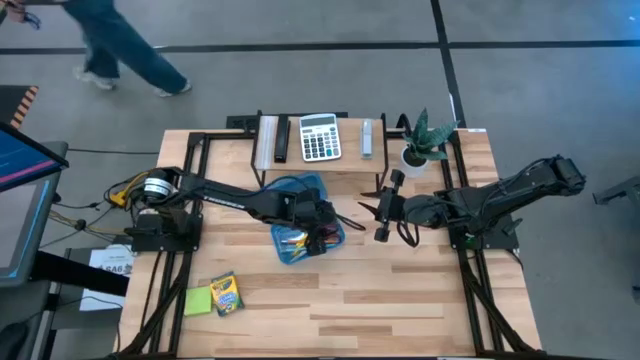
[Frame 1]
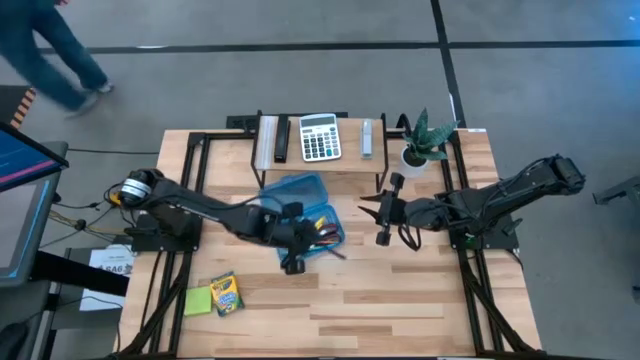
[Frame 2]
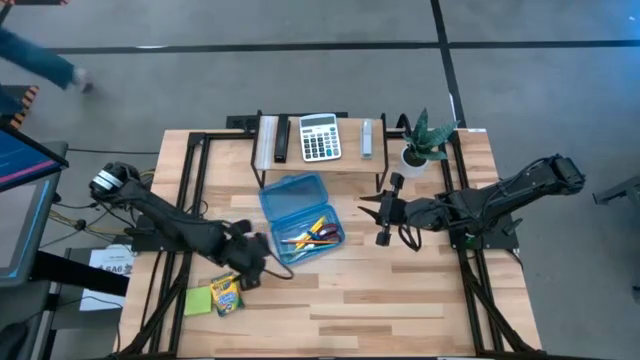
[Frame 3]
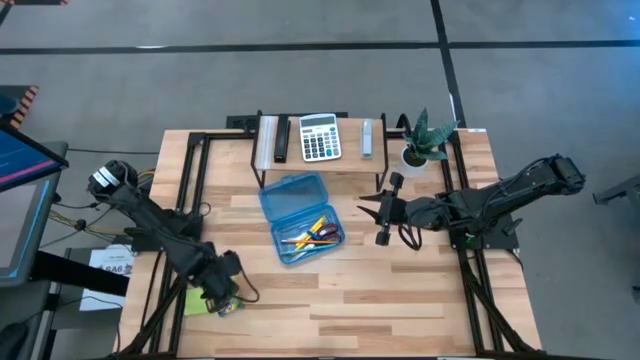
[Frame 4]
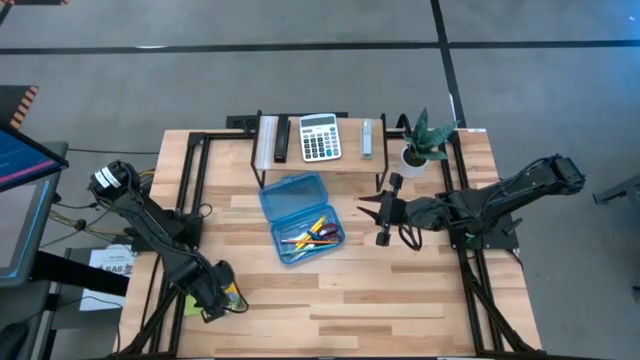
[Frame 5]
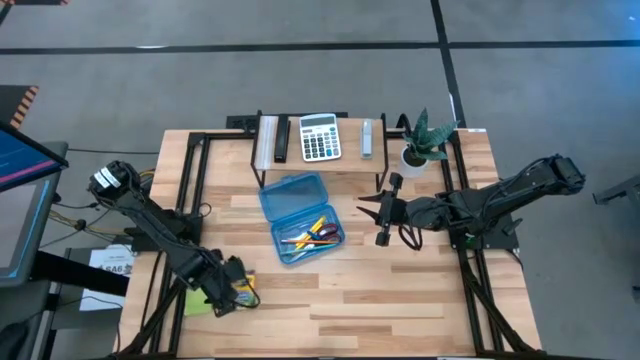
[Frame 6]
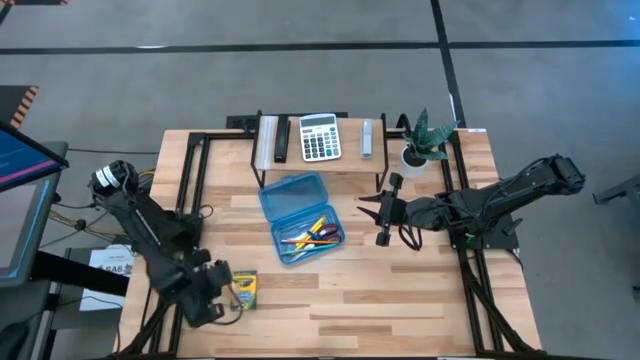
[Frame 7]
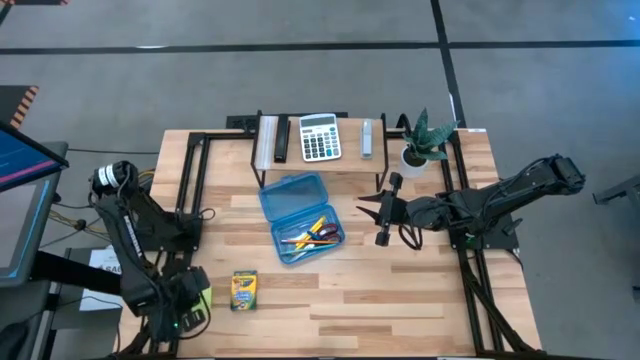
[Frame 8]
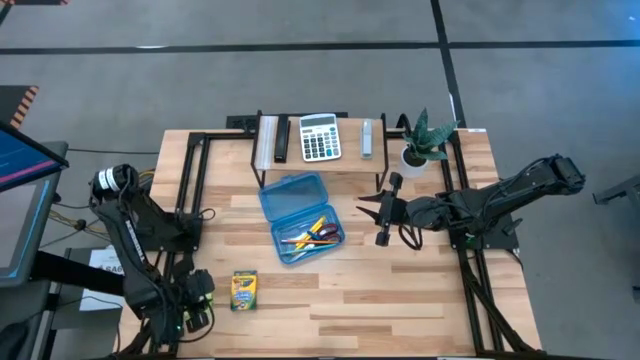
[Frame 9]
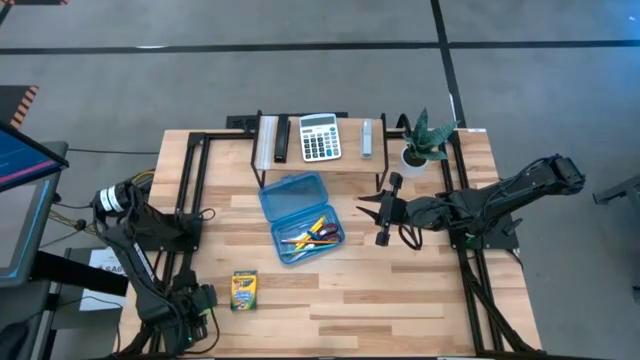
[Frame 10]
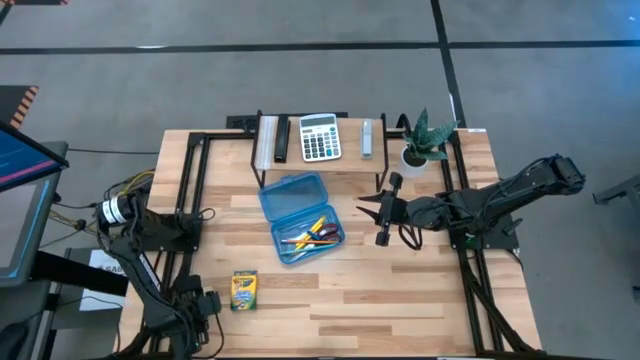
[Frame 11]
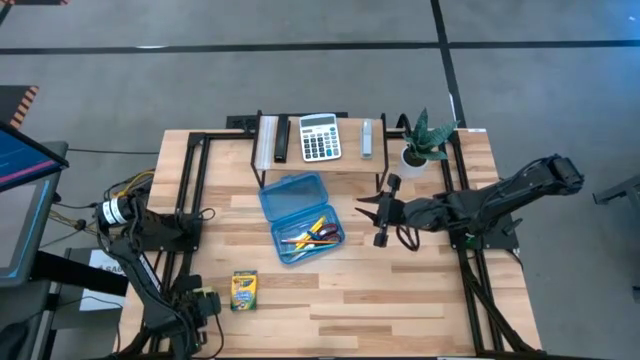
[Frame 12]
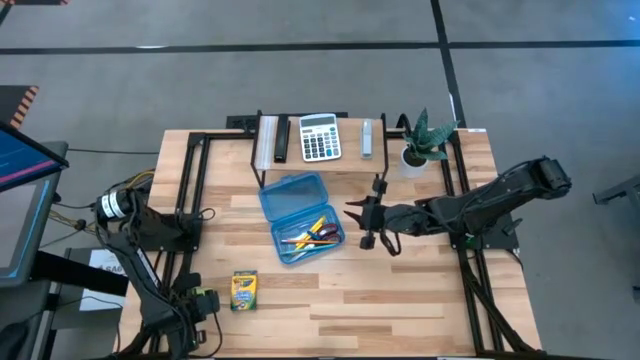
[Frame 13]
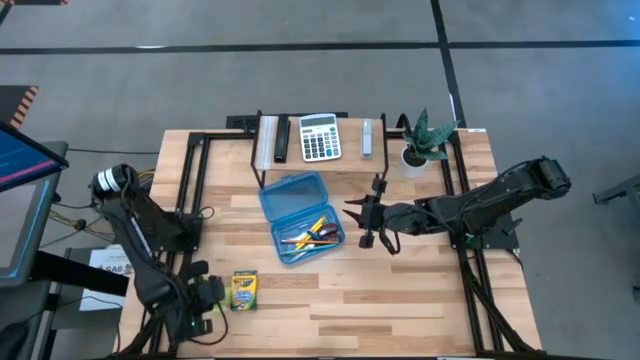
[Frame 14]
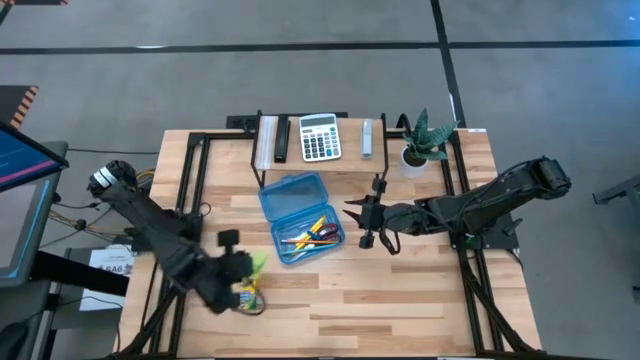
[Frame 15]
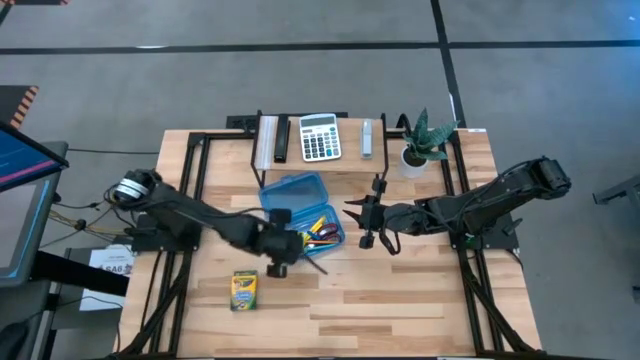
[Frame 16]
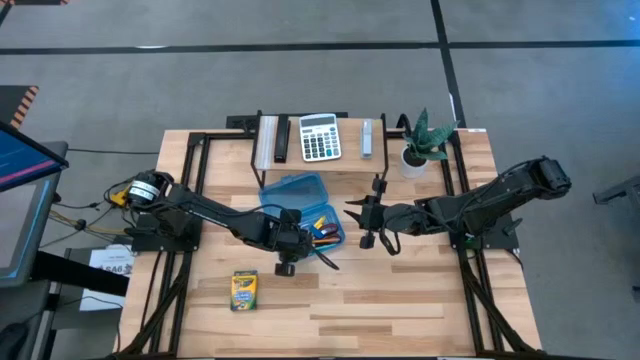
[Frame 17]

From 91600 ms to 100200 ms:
Task: Pack school essentials
Put the green sticky note into the supply box

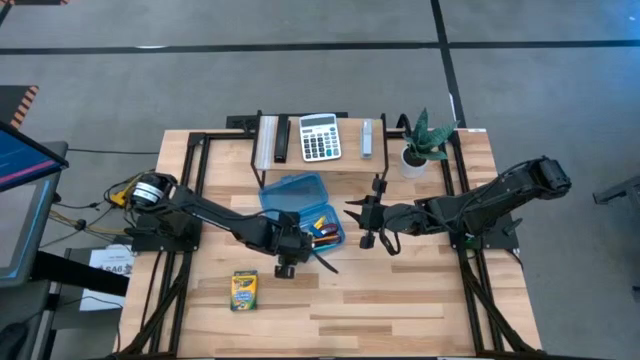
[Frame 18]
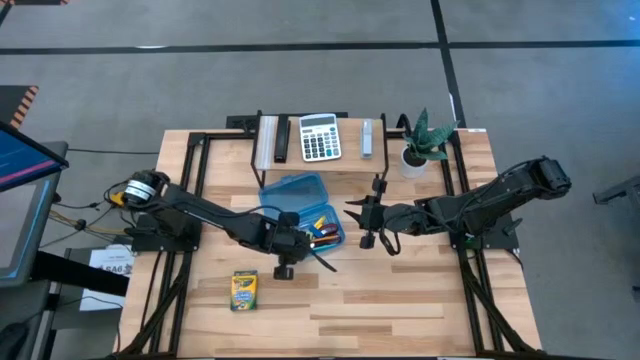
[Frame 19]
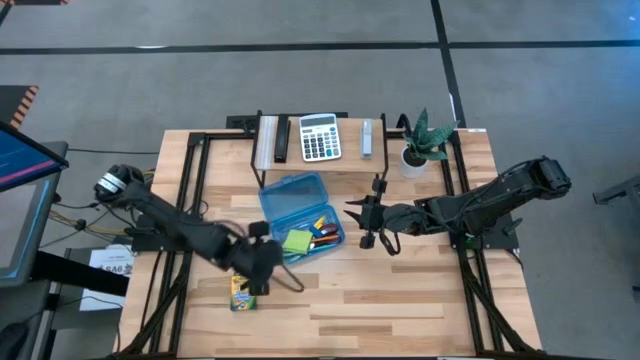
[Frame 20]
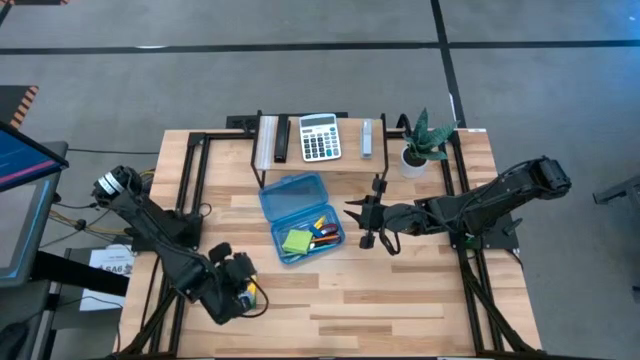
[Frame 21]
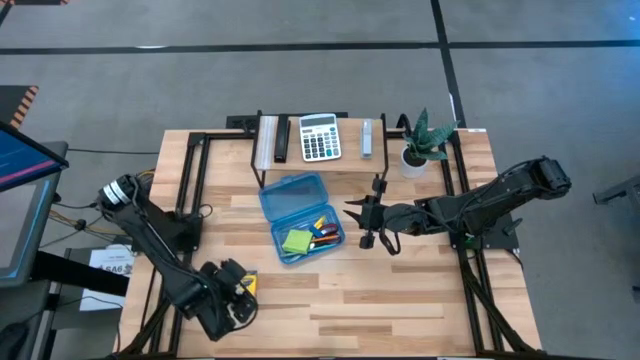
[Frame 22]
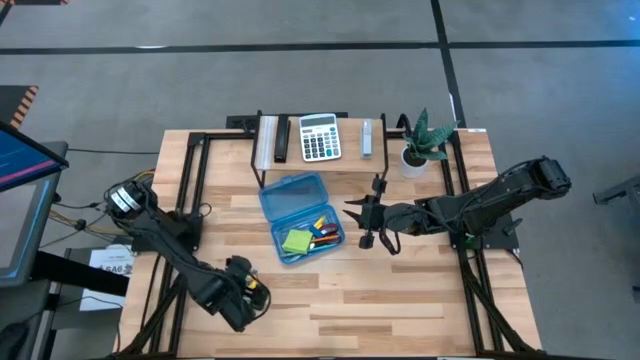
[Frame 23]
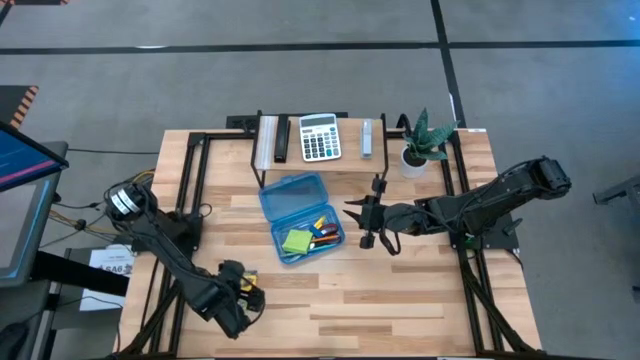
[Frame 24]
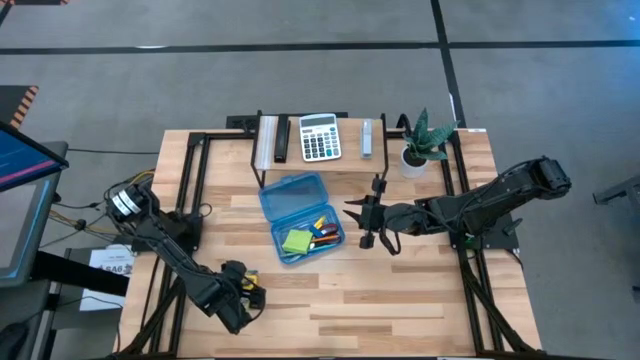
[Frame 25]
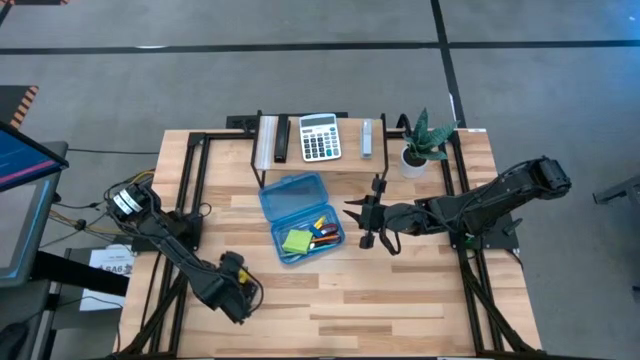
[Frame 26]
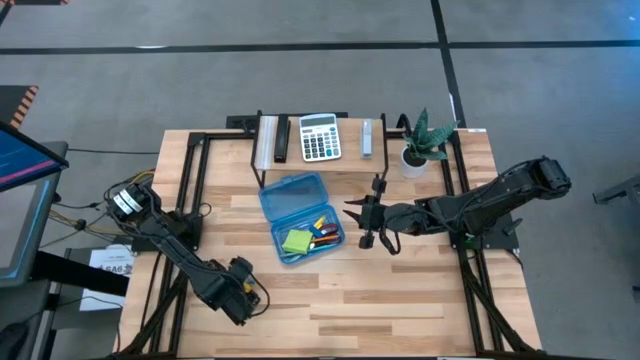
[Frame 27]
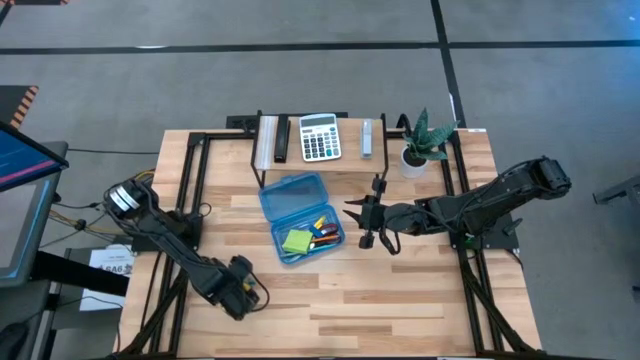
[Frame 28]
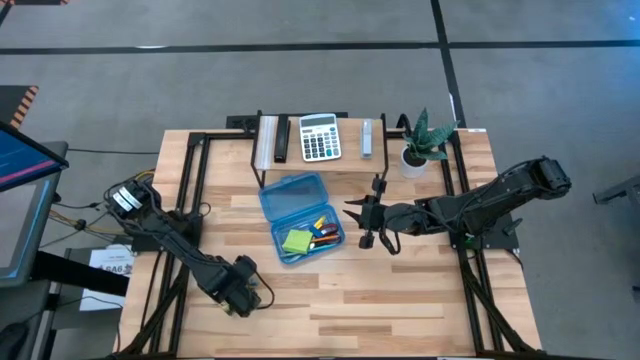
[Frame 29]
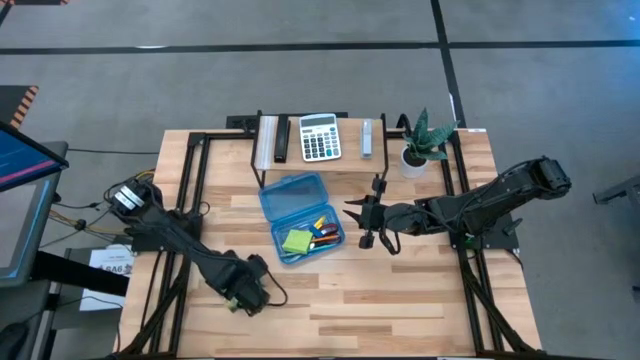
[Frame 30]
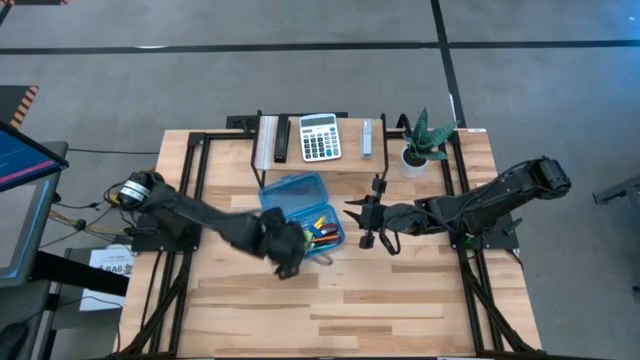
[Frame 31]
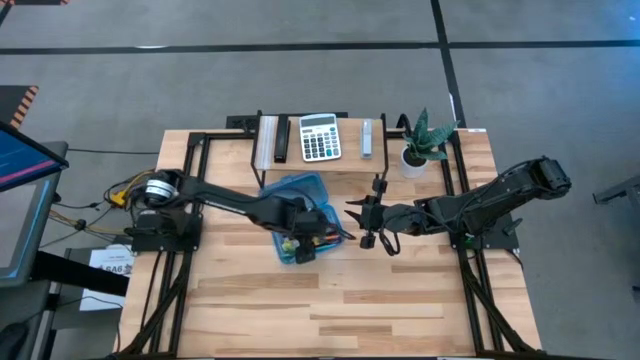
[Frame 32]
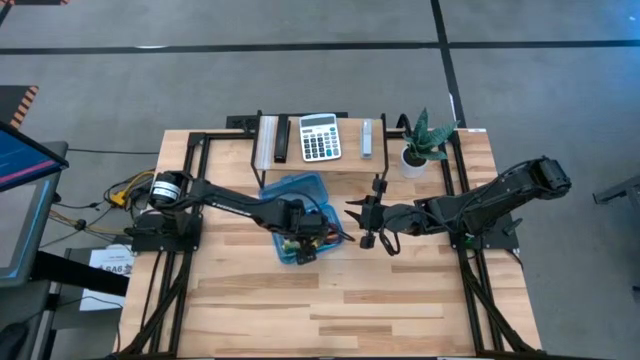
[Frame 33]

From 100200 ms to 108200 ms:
Put the yellow crayon box into the supply box

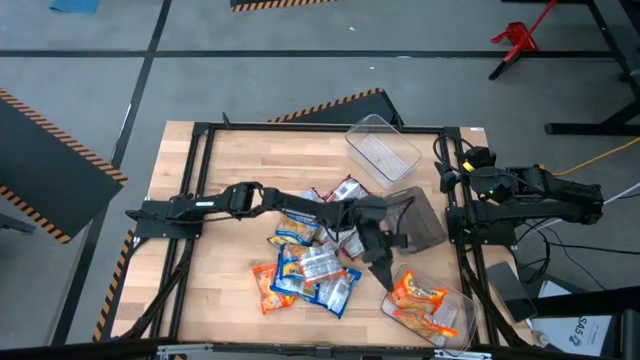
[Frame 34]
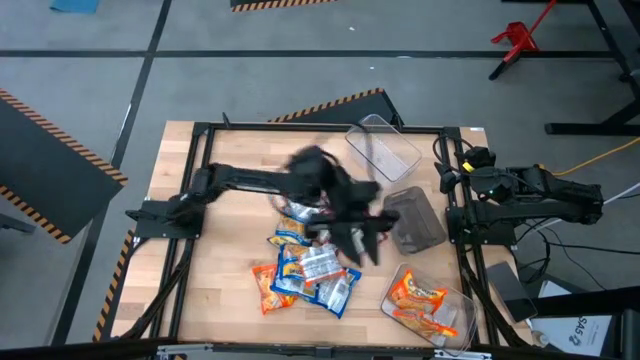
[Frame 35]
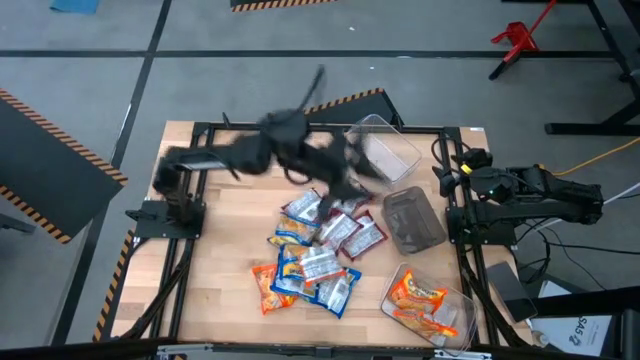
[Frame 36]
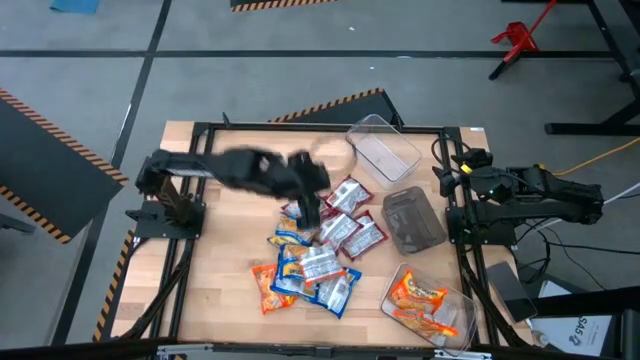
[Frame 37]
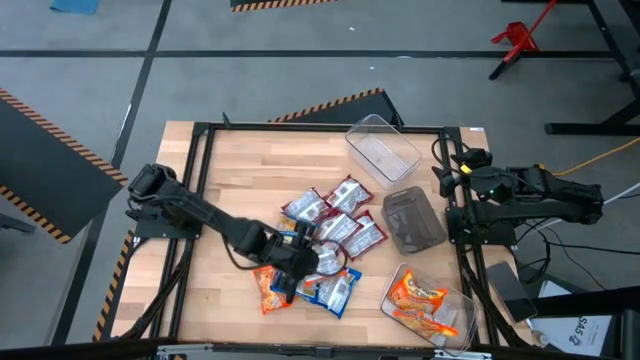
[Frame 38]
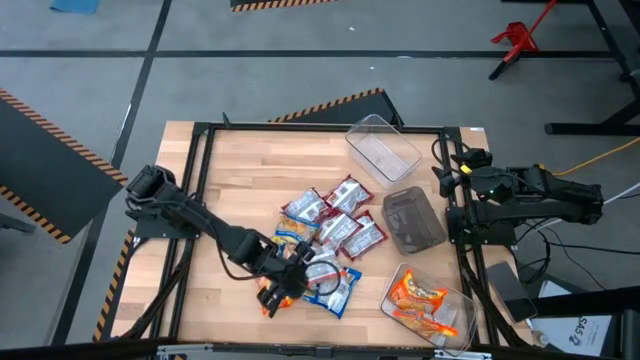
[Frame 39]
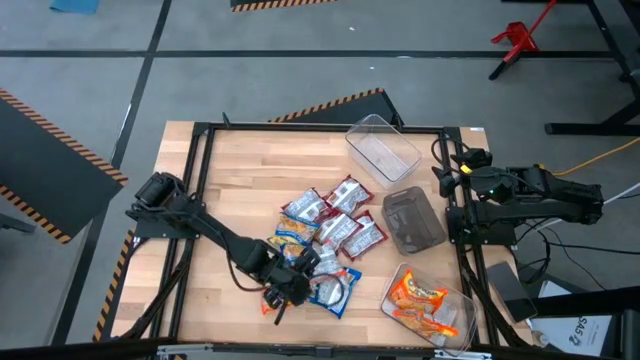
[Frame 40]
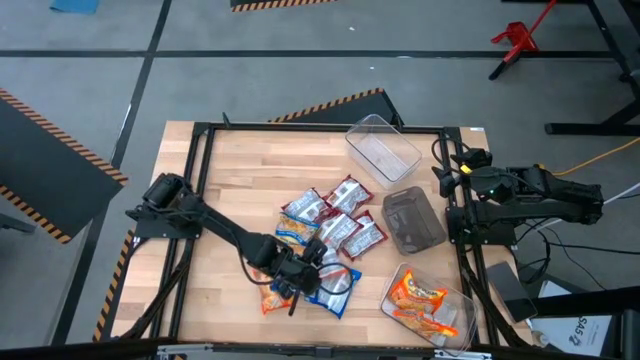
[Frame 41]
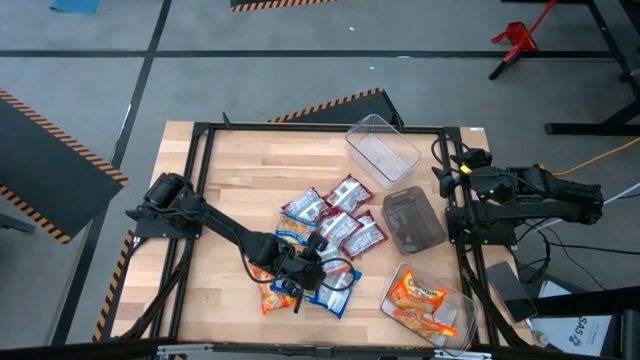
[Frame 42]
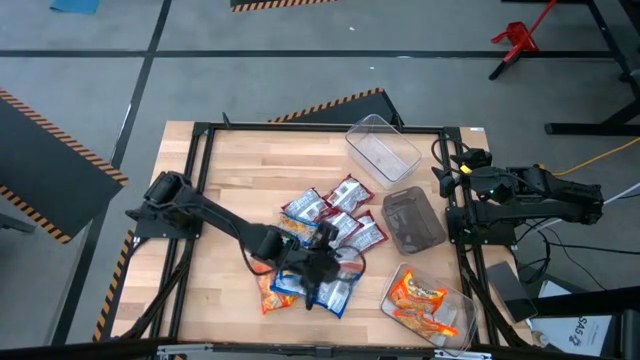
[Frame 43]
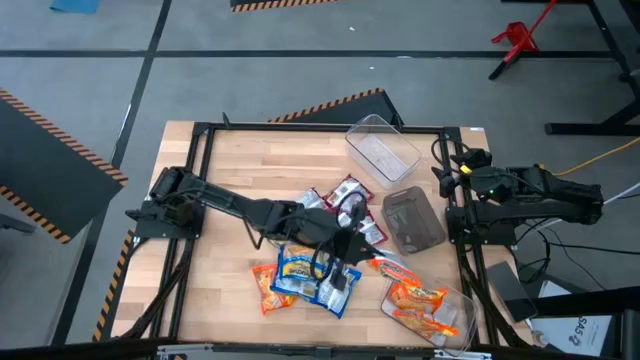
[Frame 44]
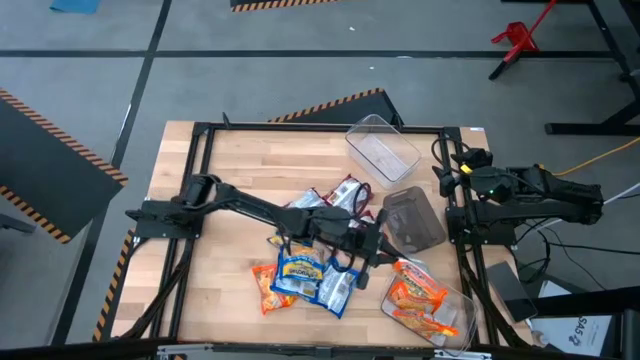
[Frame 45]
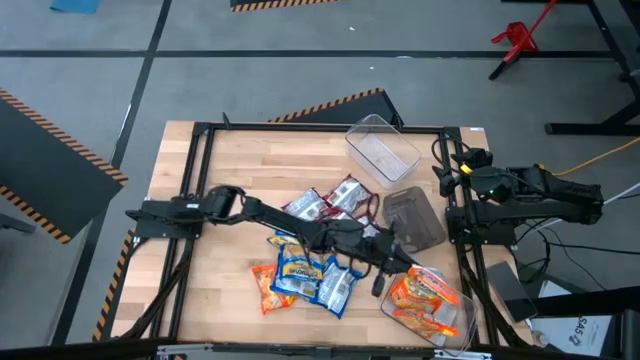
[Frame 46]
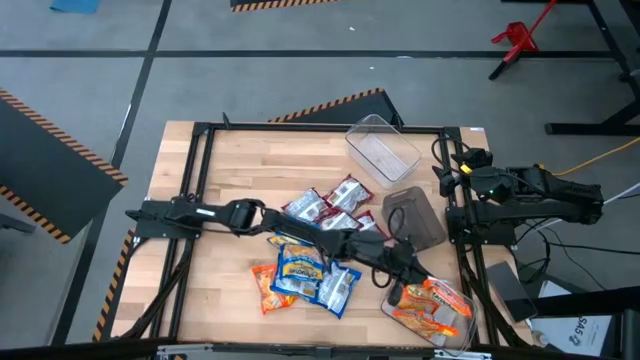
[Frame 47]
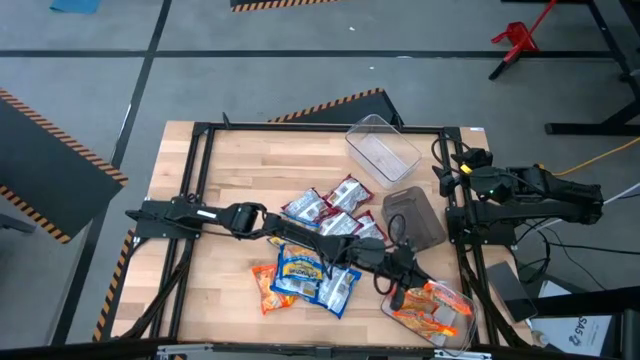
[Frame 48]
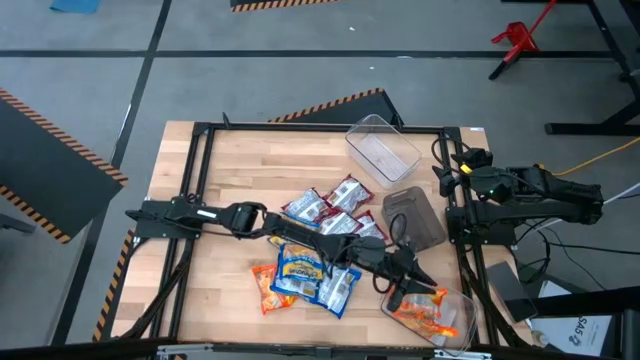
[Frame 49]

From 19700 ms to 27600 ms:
Task: Sort Maruchan noodles
Put the orange bag into the bottom transparent bin
